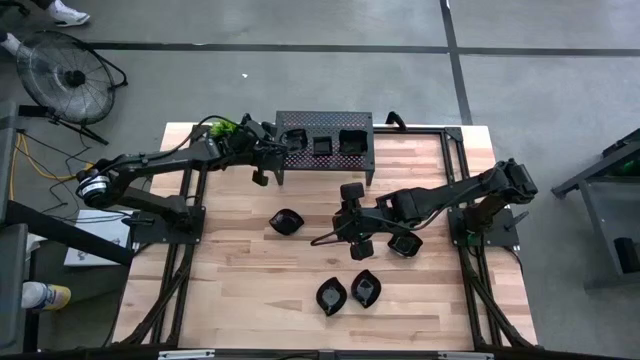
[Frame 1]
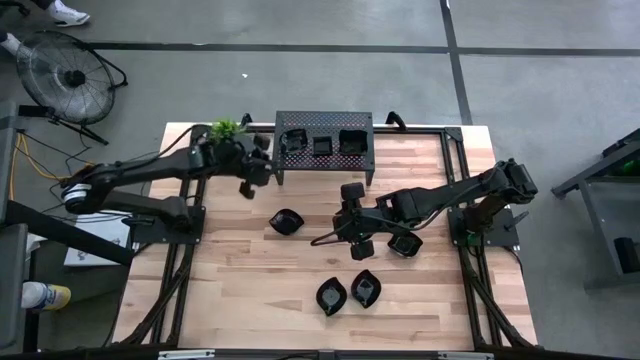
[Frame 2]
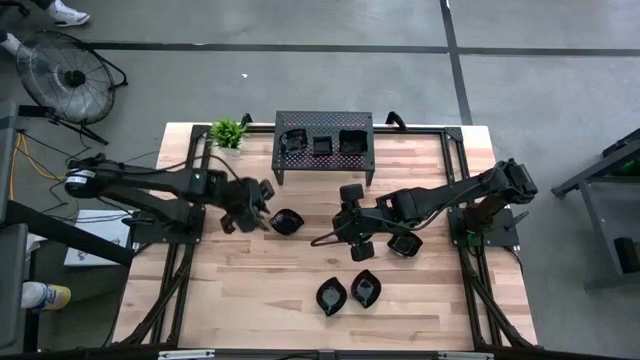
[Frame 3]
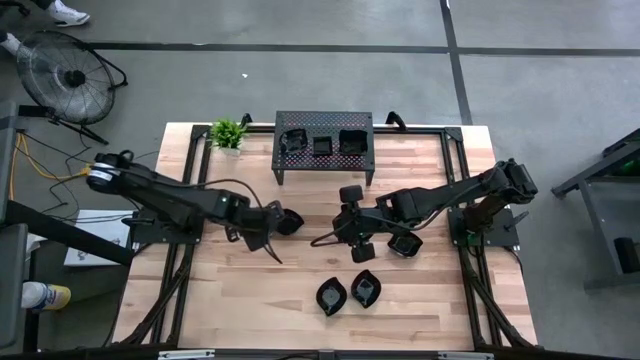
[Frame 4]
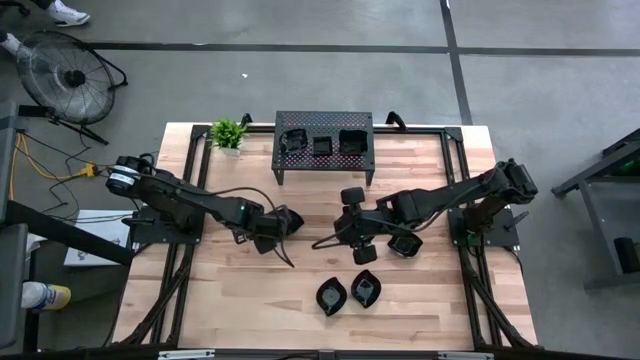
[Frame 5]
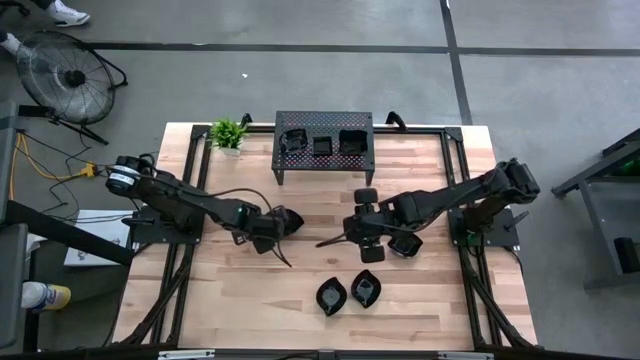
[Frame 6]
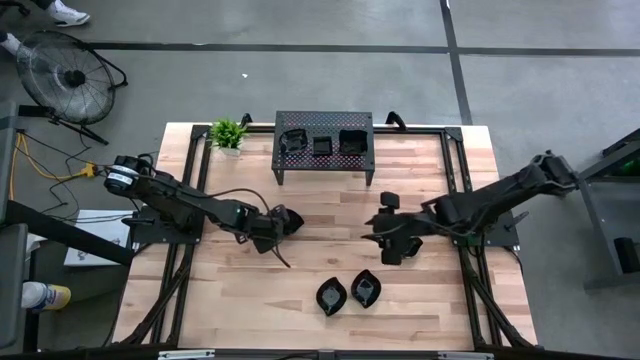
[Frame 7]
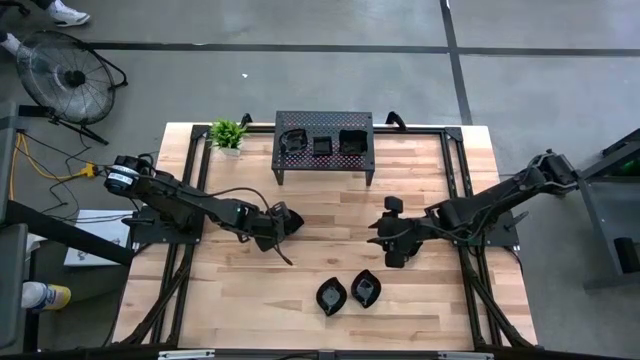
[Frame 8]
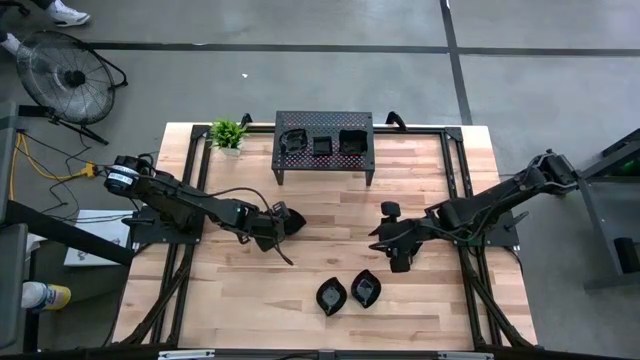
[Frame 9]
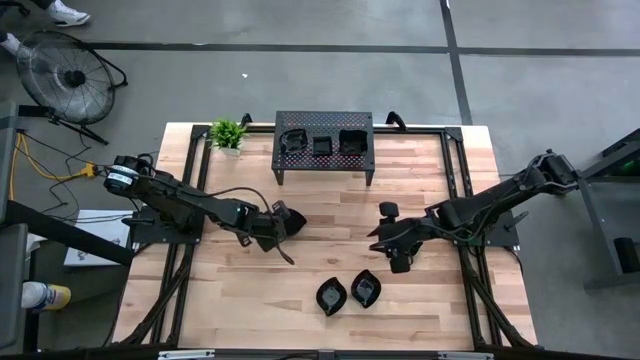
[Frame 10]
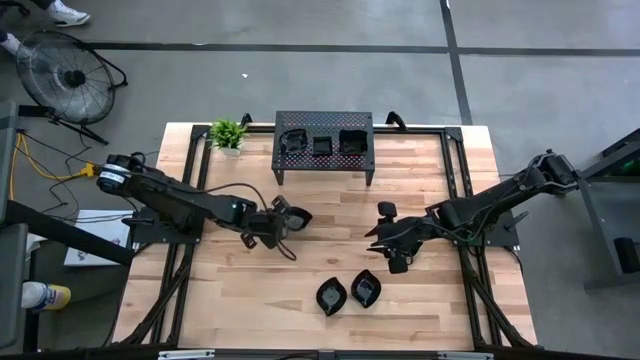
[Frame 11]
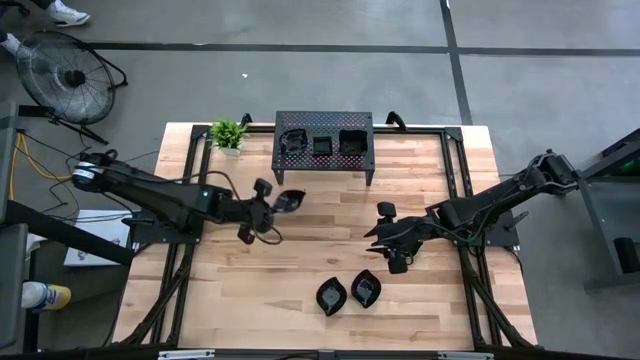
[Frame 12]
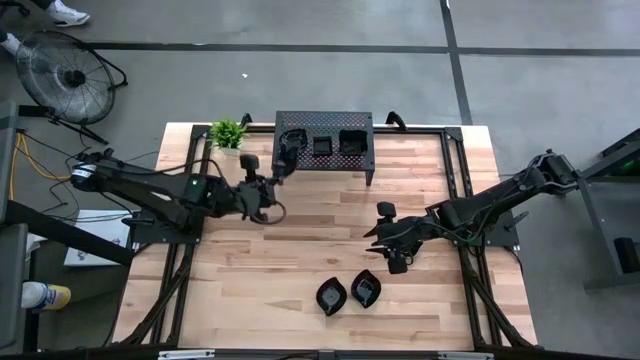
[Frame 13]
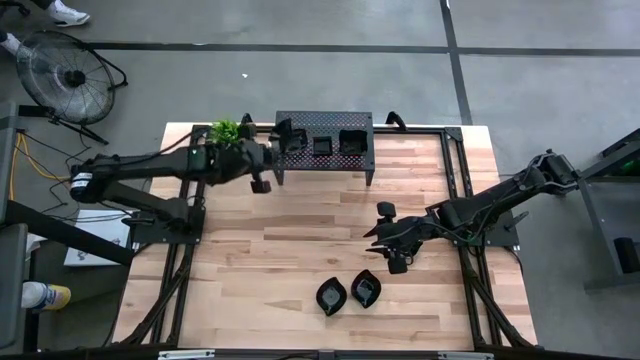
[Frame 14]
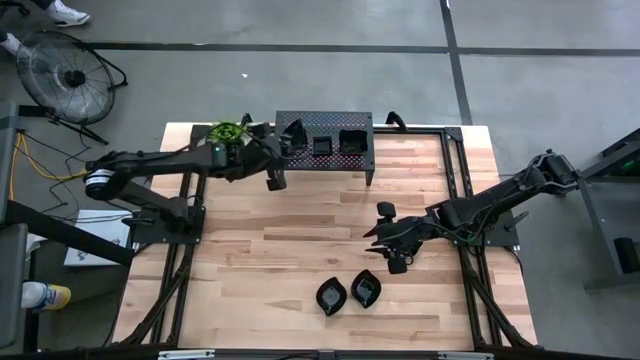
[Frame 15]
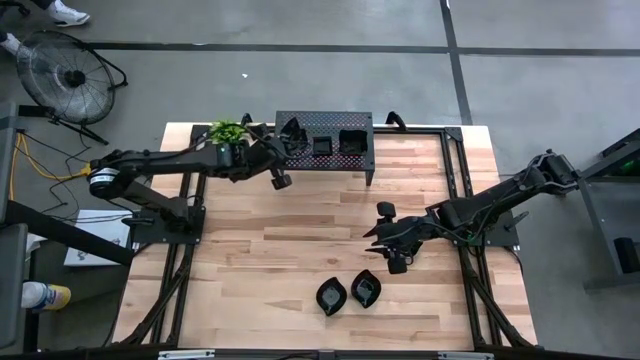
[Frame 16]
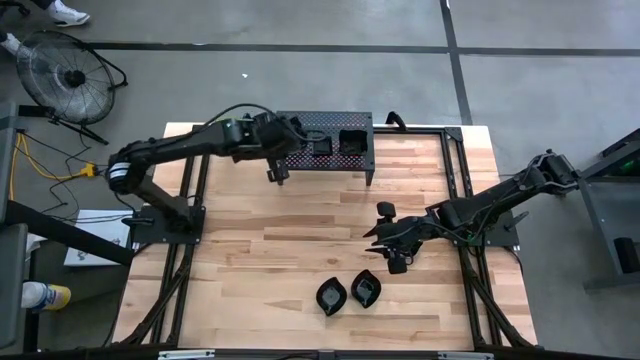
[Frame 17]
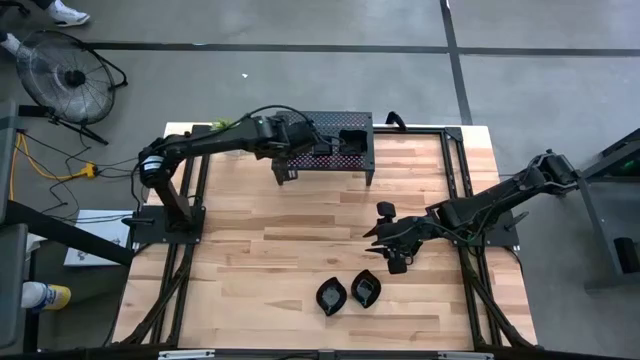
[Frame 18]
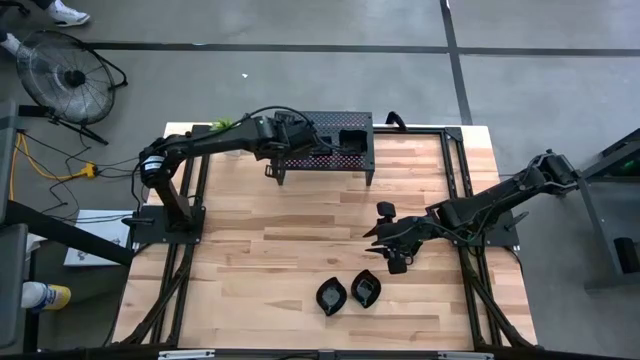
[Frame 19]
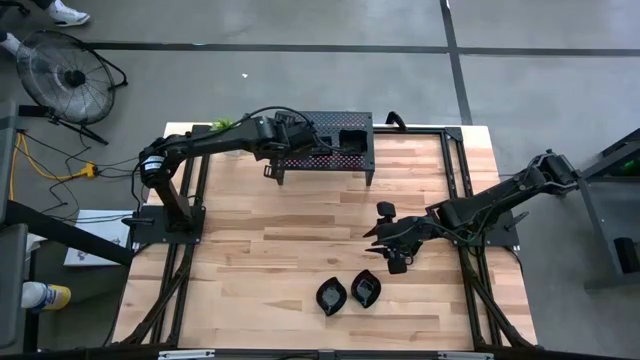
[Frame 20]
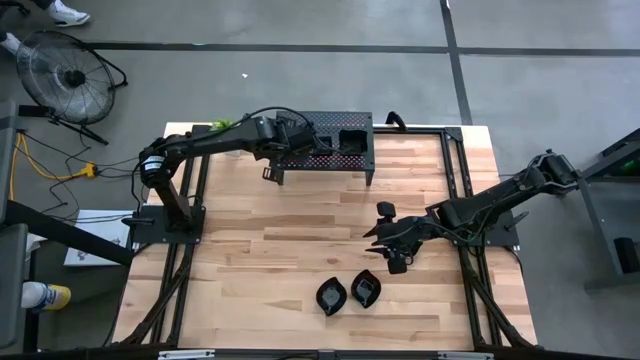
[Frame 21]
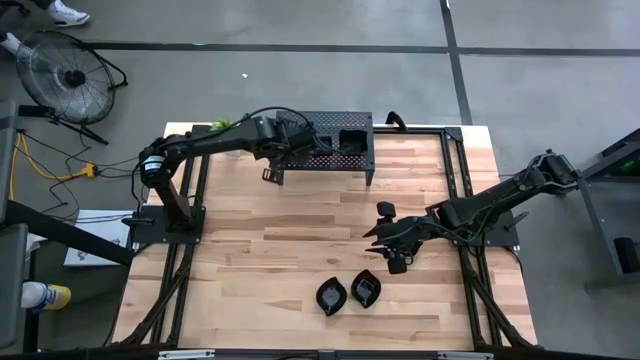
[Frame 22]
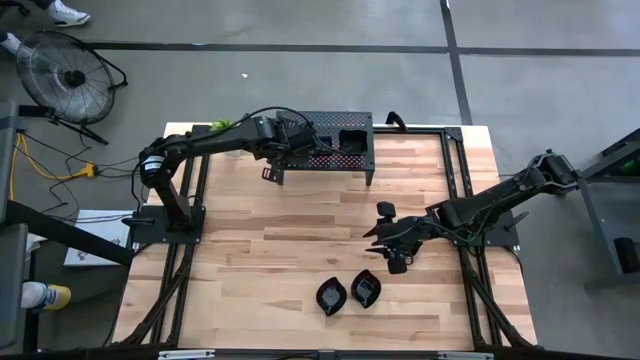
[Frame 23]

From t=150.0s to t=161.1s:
Task: Pick & Place Mini shaped plates
Stack the leaf-shaped plate on top of the leaf-shaped plate on the shelf

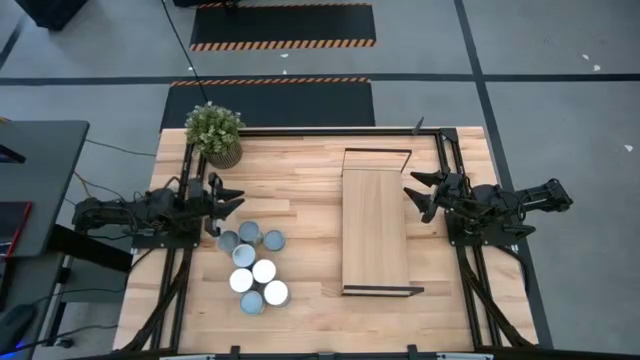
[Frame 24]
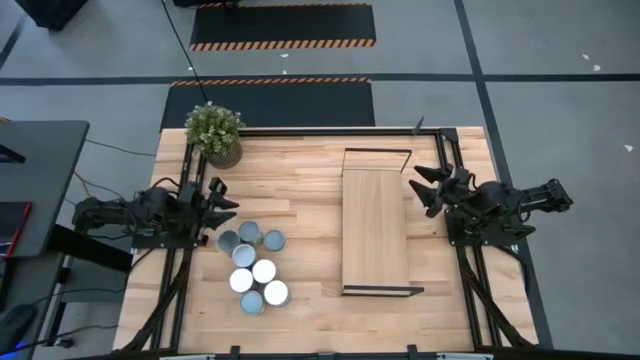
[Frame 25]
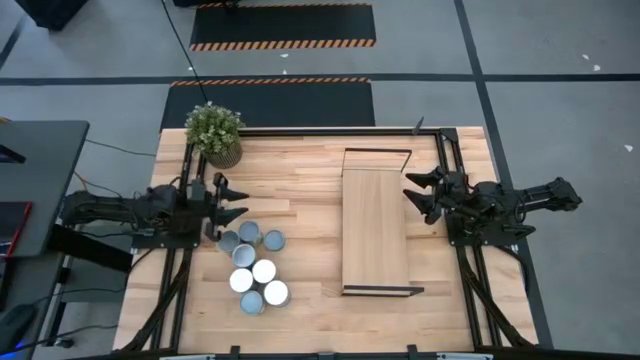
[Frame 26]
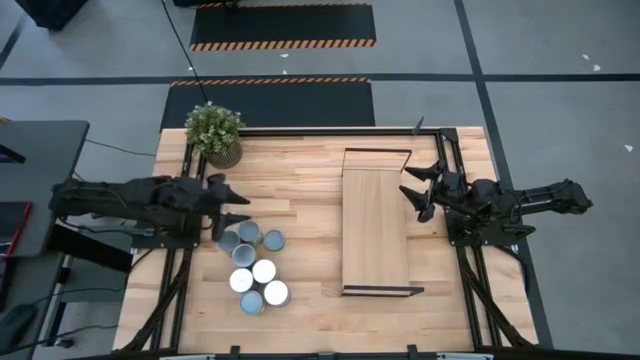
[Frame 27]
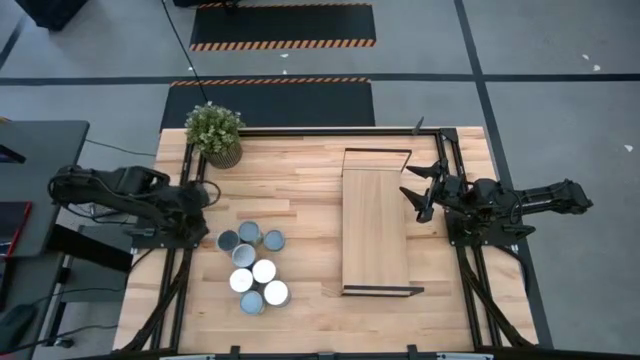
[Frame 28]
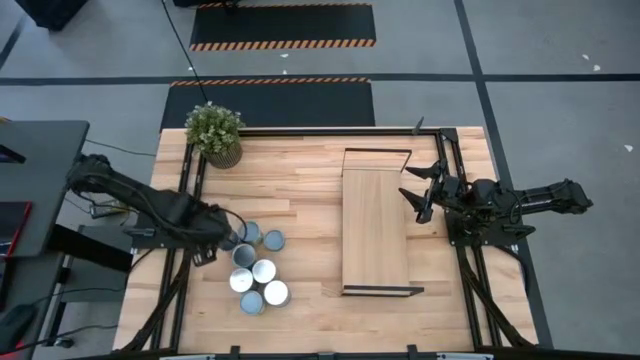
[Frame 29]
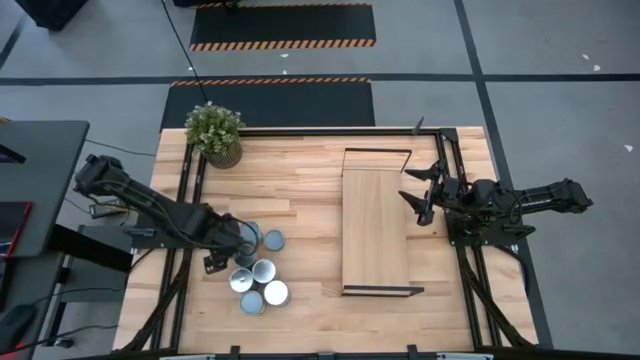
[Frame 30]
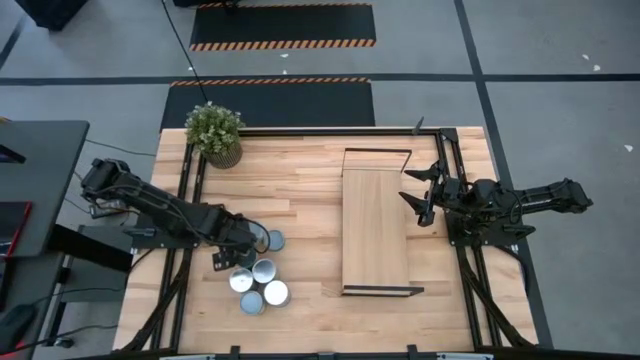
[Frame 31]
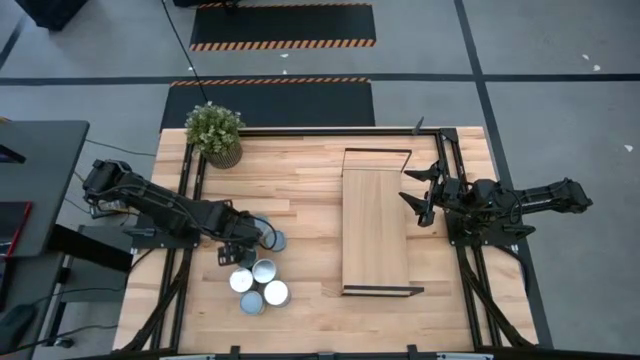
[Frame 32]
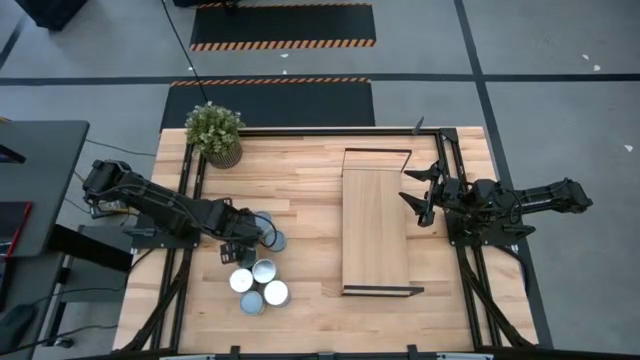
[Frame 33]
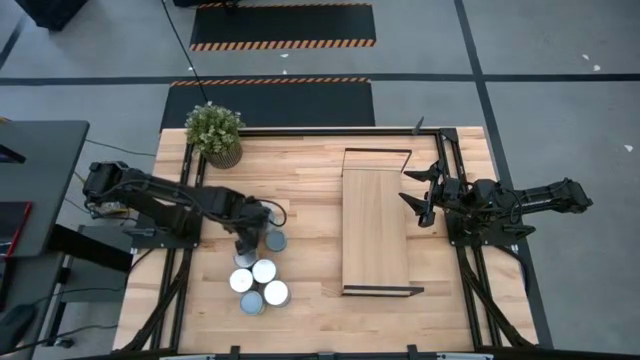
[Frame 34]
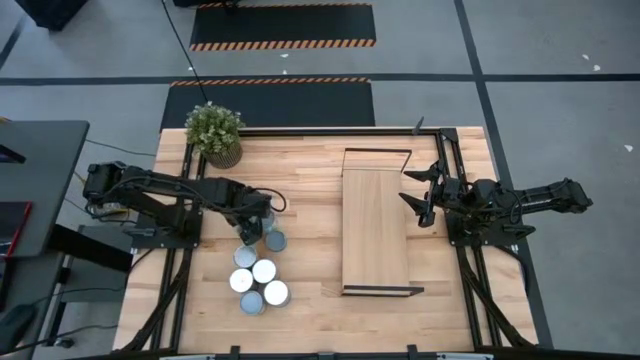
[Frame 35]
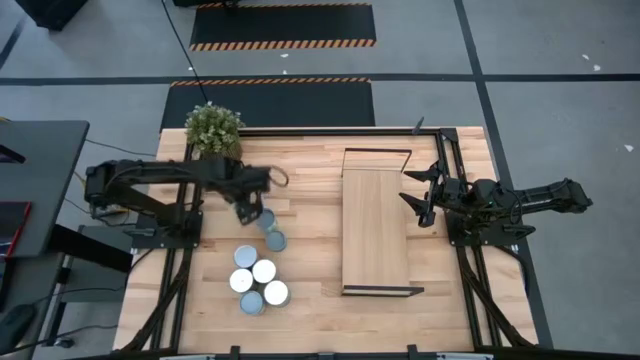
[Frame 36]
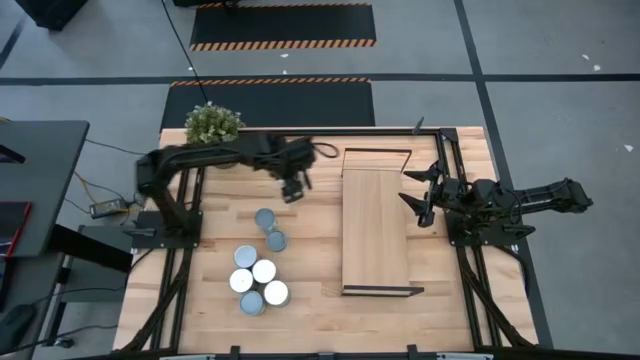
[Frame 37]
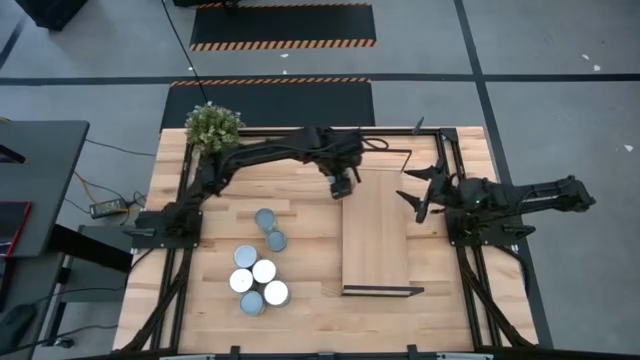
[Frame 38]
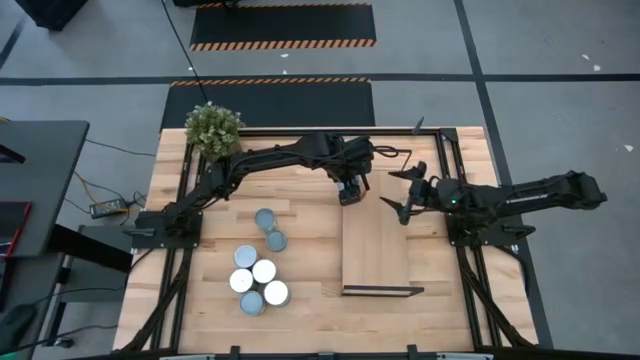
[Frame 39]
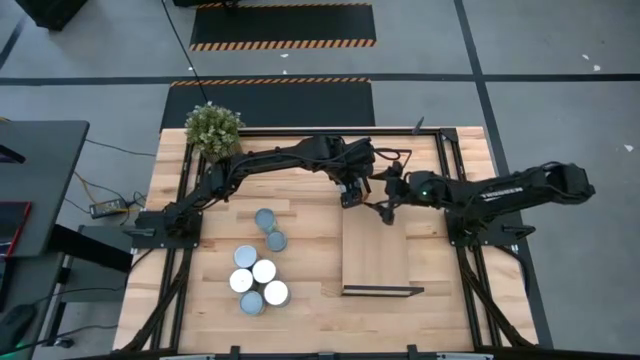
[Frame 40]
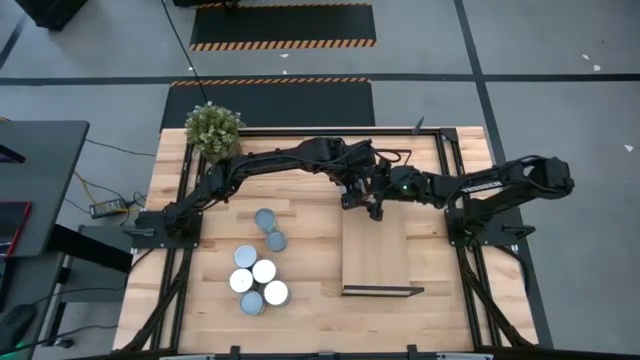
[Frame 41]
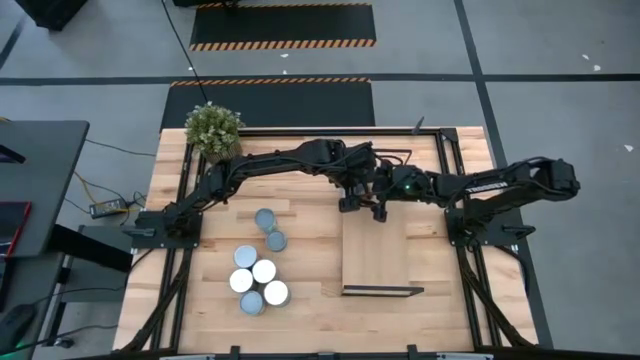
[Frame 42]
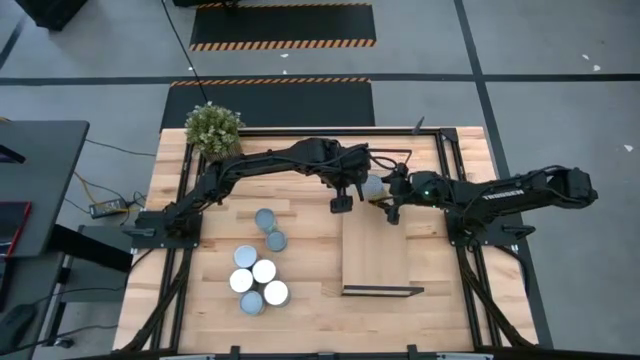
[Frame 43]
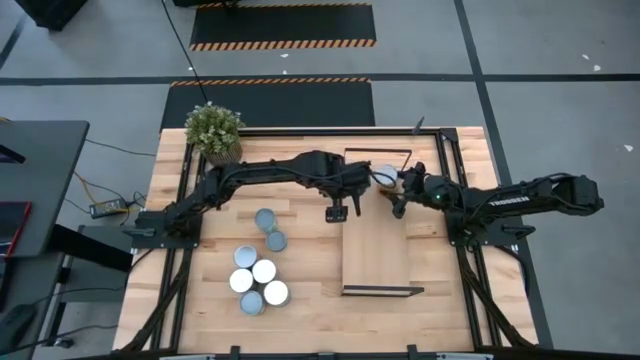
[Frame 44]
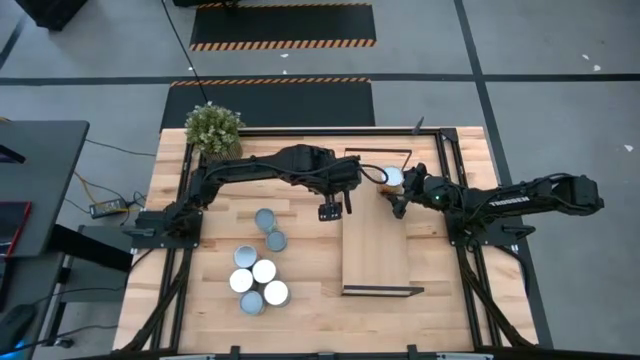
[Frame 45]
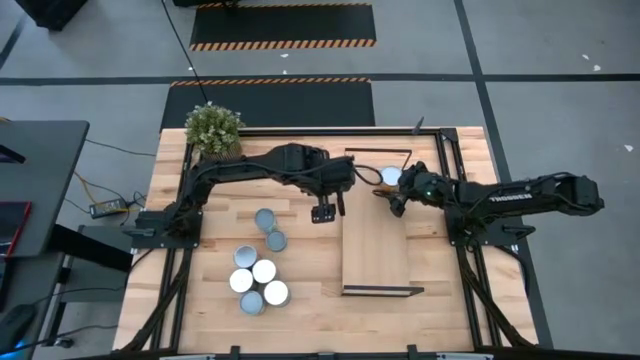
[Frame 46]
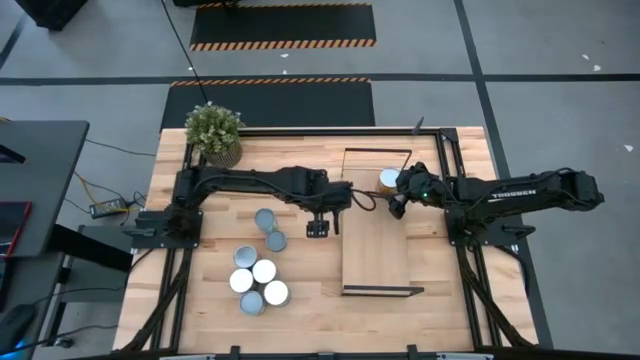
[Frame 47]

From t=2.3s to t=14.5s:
Task: Pick and place cans onto a shelf
Put the canned corn on the shelf
